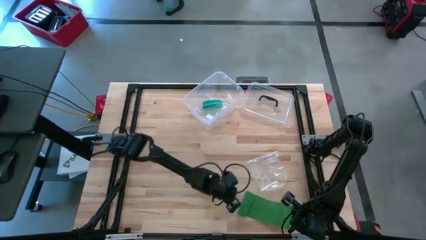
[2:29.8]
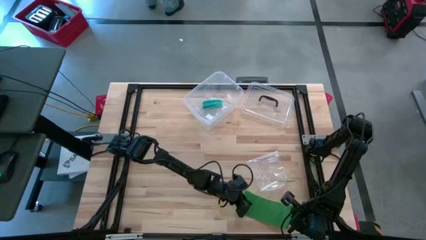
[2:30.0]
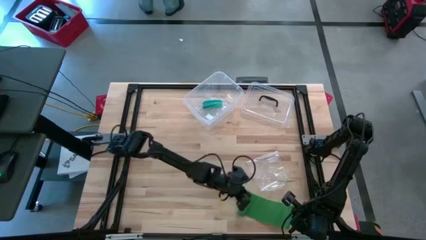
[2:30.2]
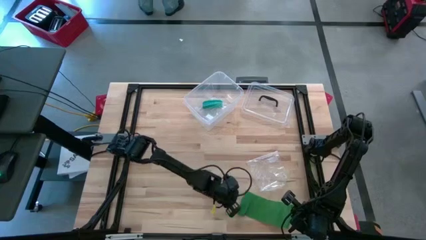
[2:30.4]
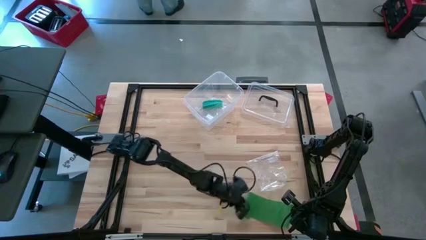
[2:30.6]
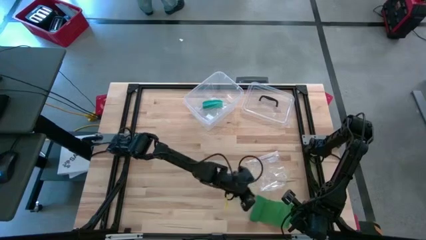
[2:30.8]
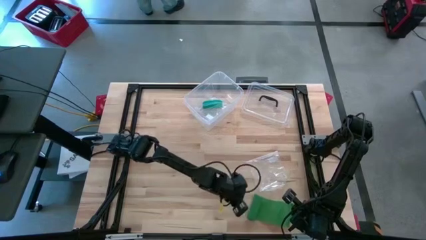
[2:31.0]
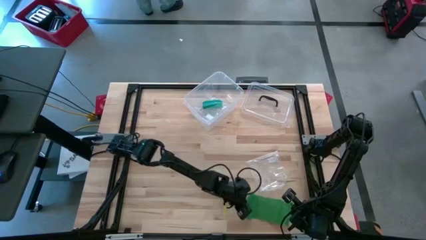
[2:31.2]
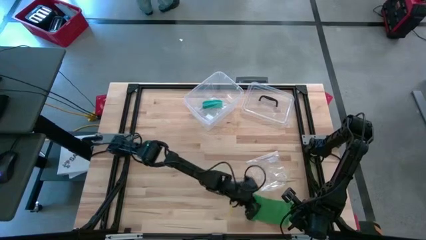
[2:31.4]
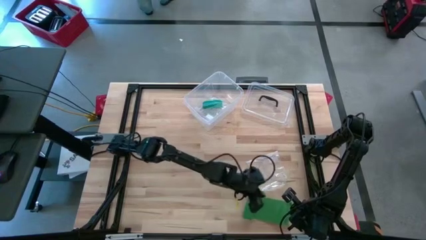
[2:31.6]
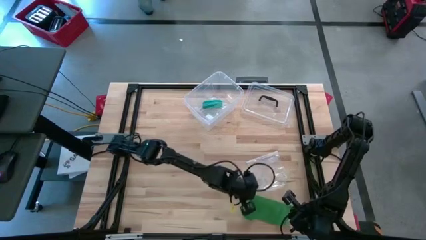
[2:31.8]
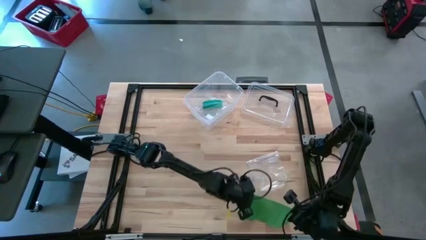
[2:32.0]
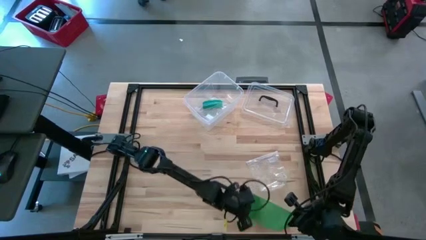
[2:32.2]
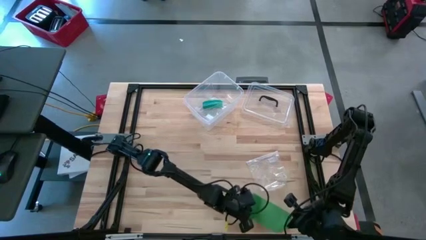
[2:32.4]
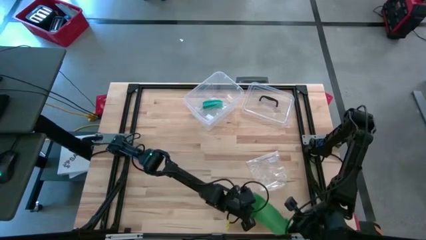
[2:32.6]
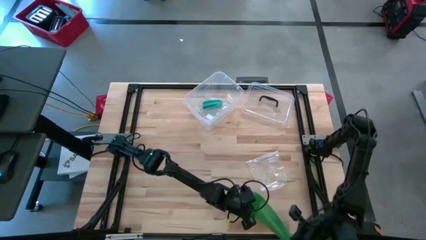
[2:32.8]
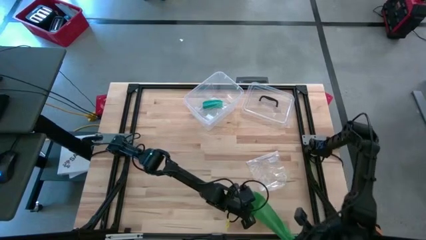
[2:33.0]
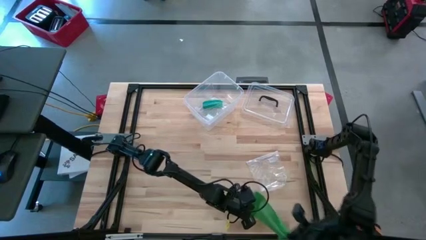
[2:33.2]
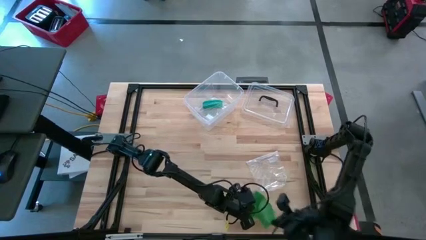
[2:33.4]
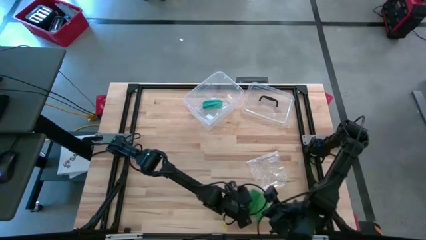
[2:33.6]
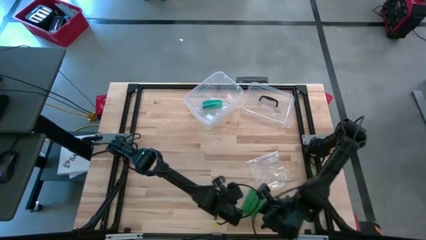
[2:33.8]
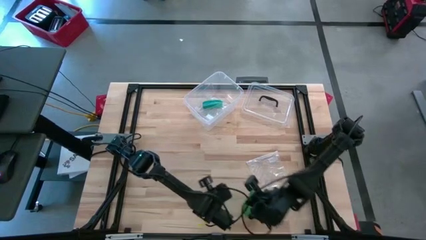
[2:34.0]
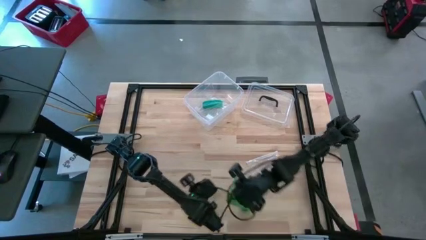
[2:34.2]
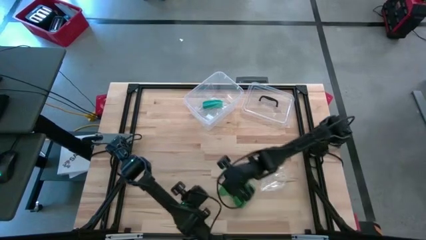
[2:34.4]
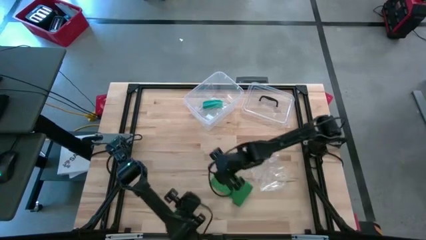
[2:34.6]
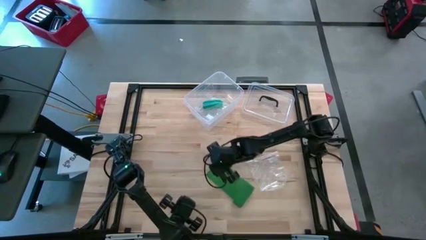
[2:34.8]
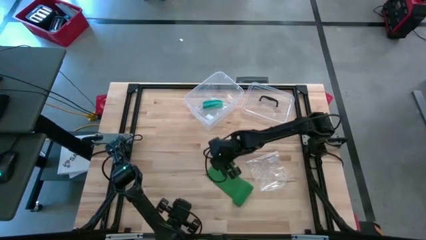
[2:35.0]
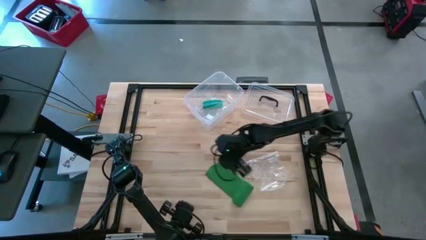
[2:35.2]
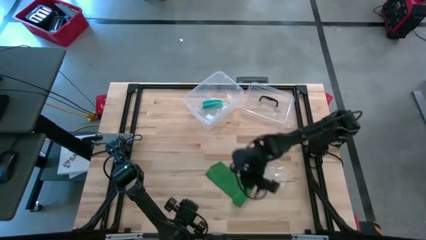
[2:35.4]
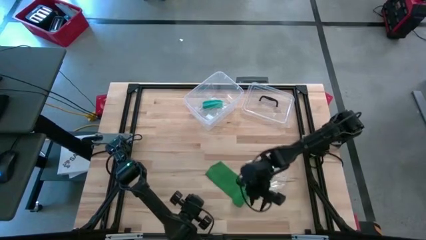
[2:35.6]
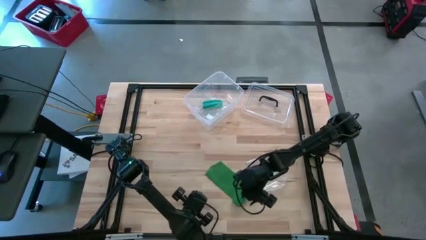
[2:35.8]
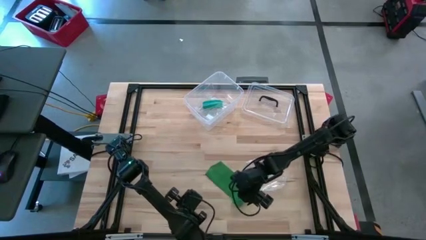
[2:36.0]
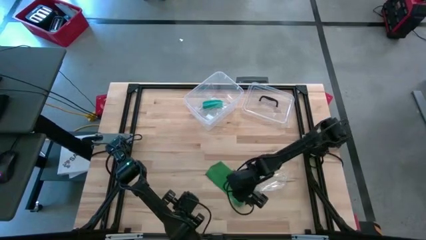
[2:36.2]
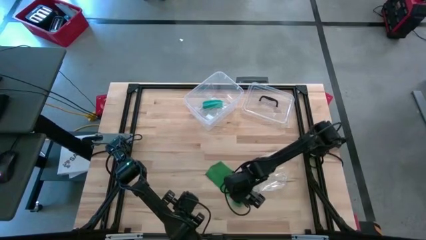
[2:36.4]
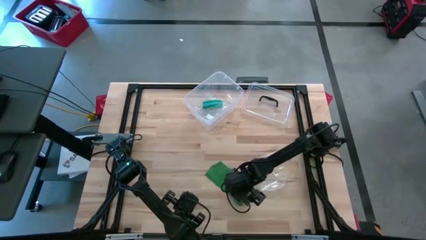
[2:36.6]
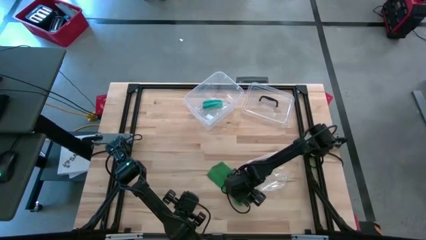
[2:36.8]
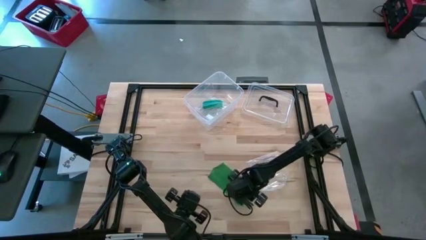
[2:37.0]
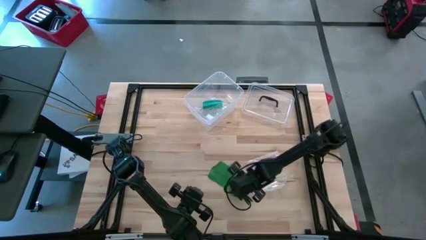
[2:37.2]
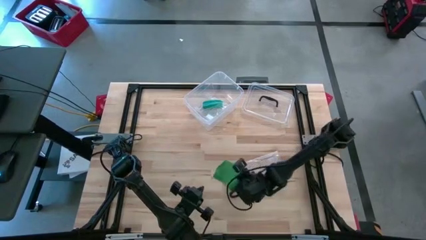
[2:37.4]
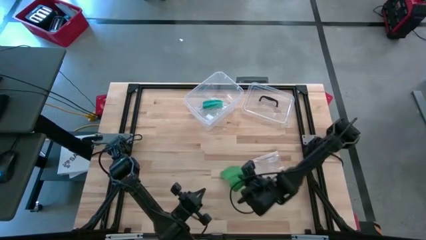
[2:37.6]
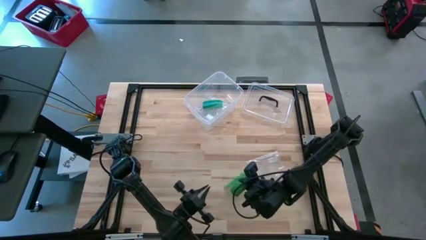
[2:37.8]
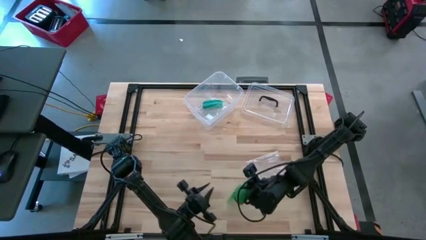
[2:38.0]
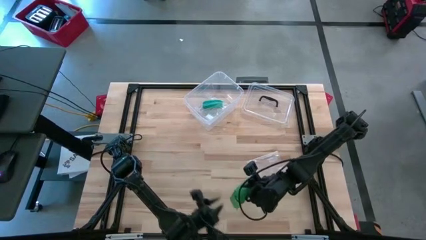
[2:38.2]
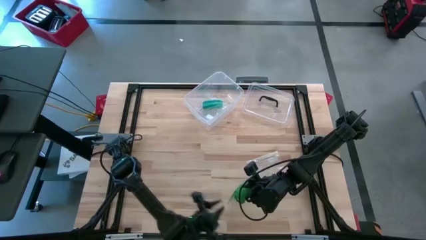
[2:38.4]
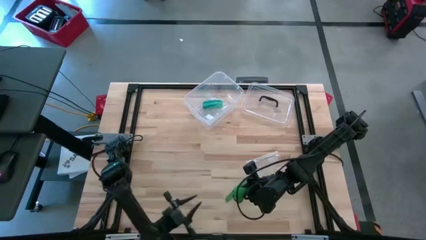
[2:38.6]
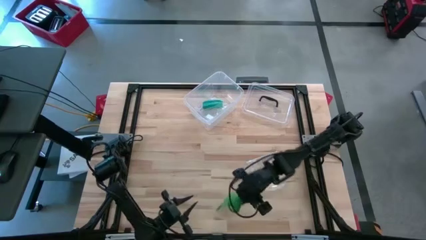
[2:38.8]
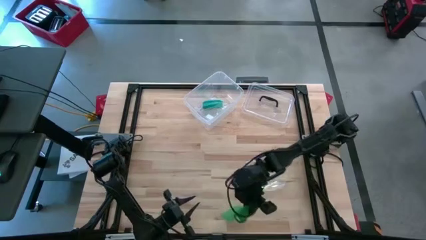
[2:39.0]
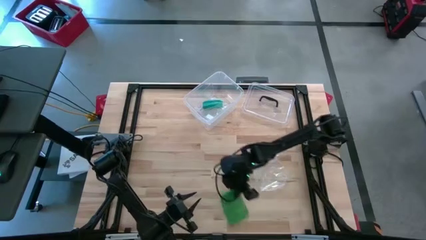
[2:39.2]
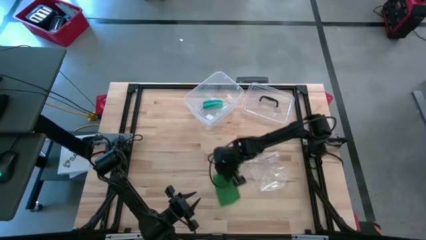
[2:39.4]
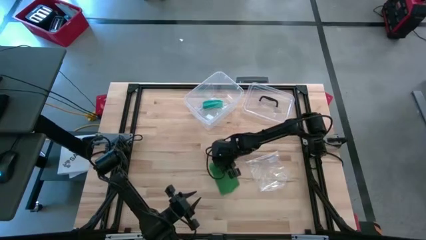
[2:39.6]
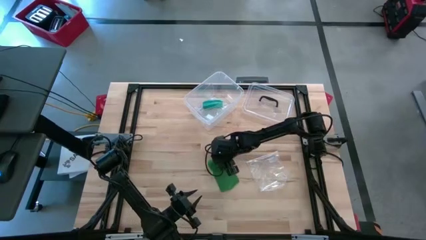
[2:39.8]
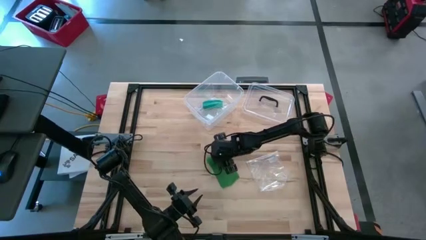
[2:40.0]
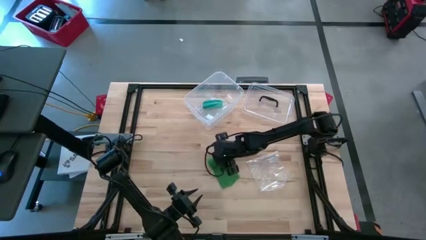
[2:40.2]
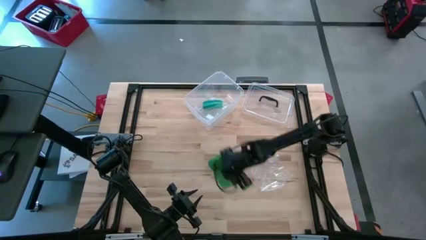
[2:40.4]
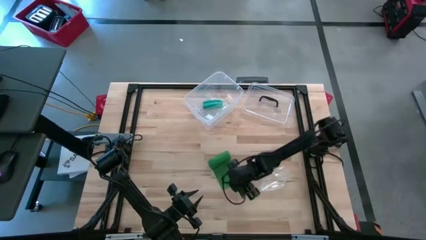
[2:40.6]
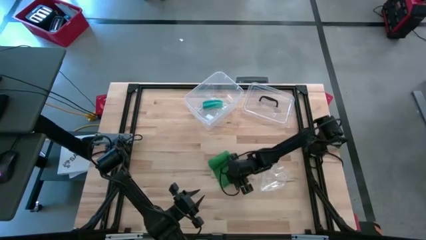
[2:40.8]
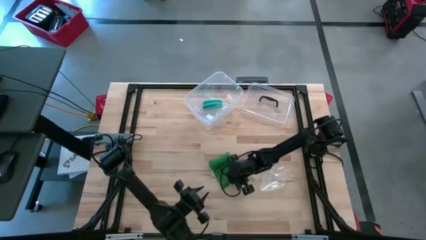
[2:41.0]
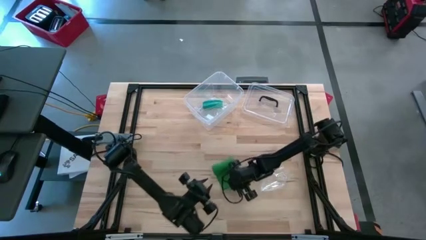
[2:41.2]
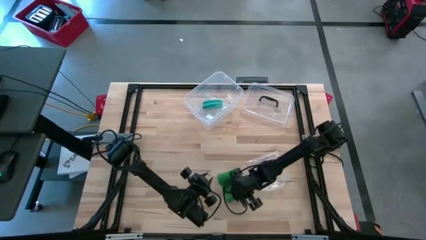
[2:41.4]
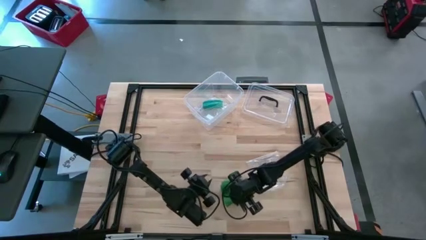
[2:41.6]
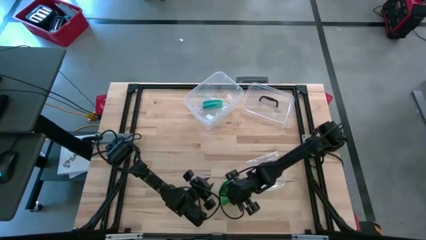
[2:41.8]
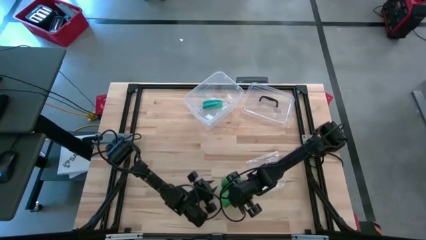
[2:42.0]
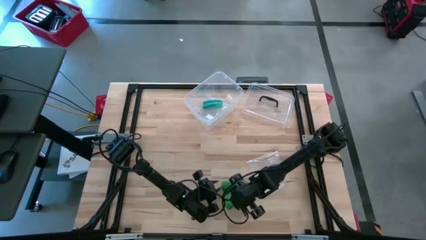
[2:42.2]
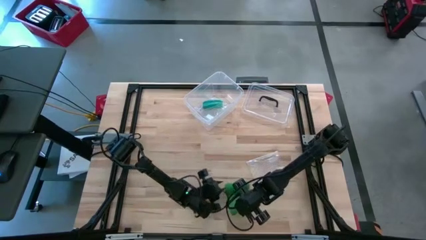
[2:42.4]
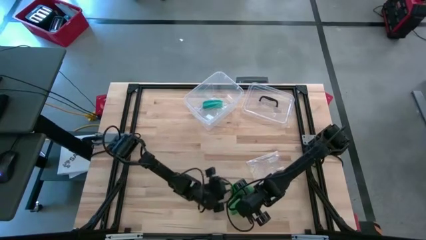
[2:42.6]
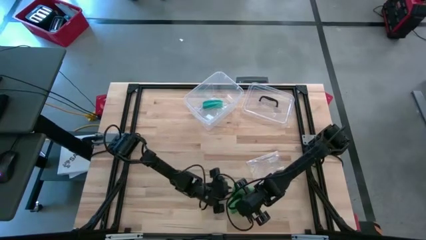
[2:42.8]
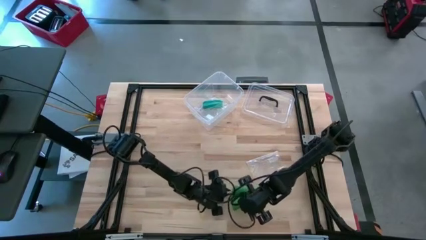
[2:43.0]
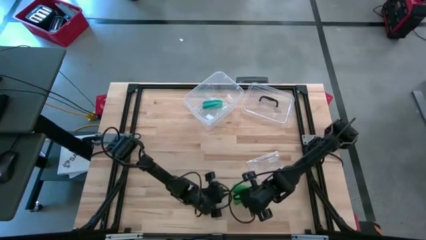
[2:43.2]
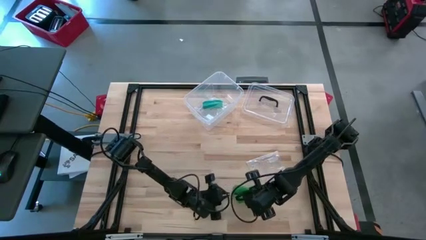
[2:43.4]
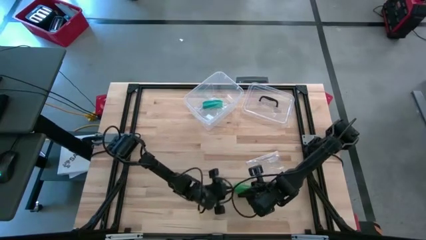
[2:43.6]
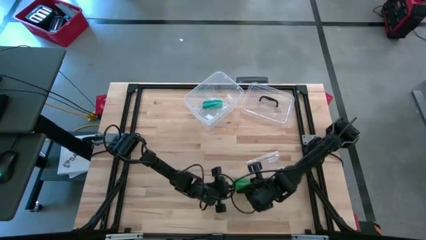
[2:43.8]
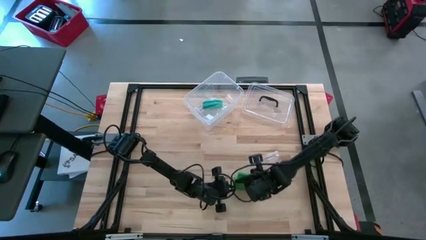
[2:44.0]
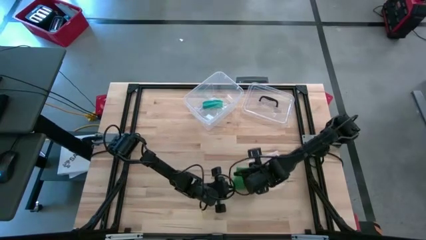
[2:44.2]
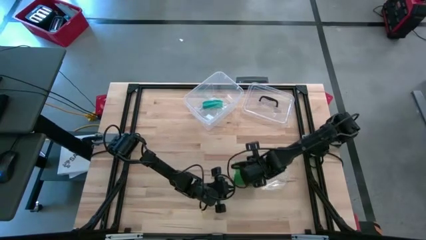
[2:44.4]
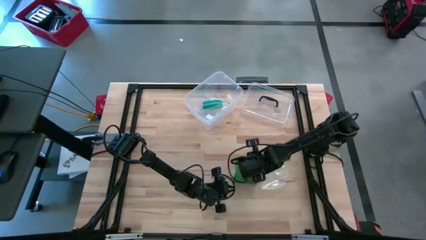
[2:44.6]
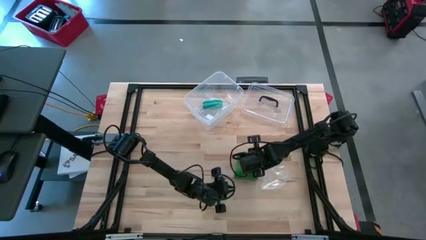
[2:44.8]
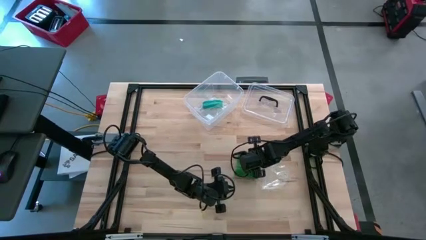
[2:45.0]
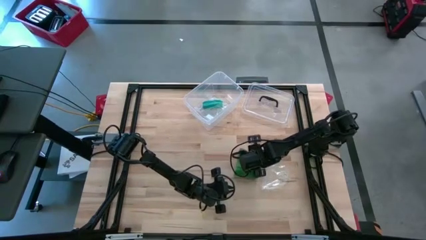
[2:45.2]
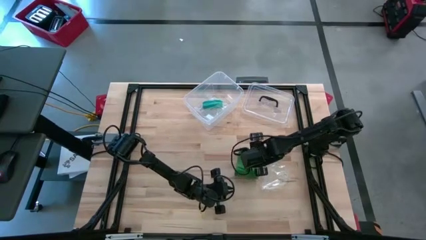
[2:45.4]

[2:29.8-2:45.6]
Task: Roll bandage
Roll the green bandage

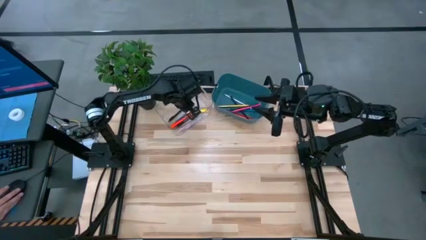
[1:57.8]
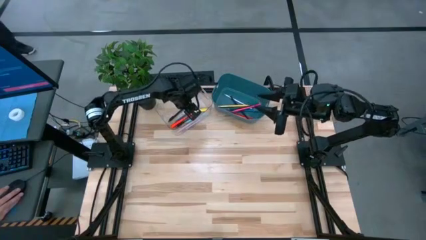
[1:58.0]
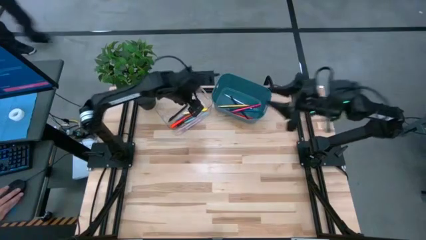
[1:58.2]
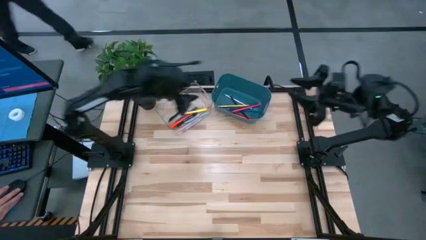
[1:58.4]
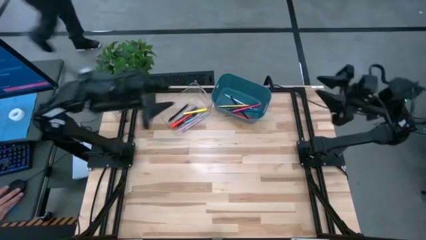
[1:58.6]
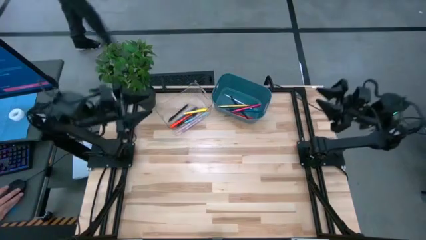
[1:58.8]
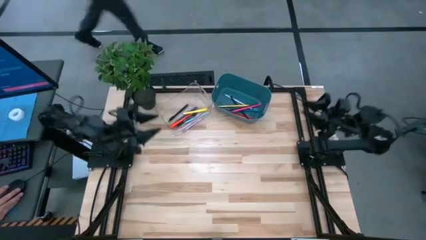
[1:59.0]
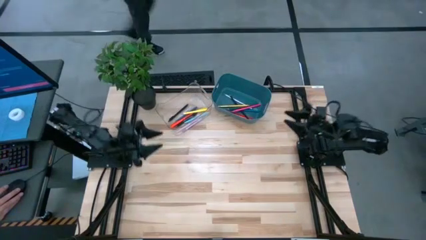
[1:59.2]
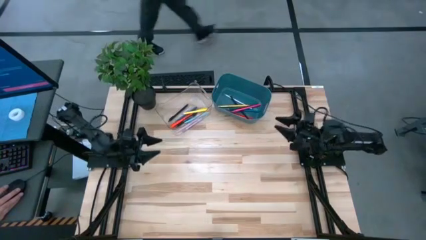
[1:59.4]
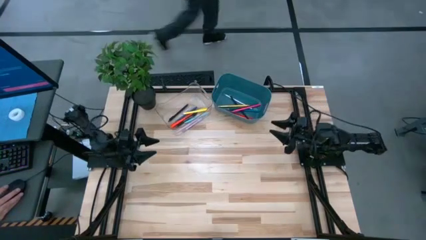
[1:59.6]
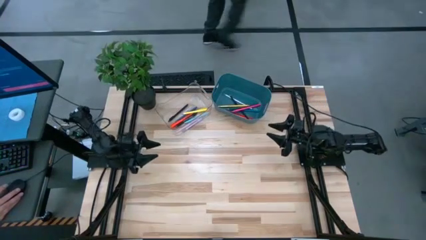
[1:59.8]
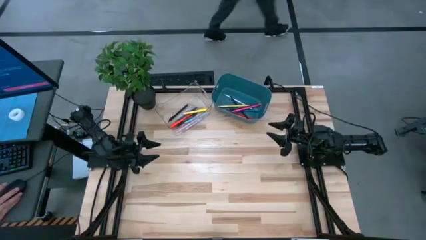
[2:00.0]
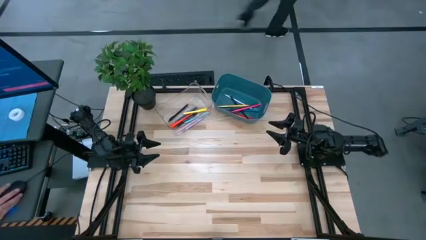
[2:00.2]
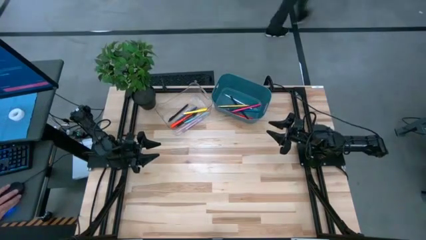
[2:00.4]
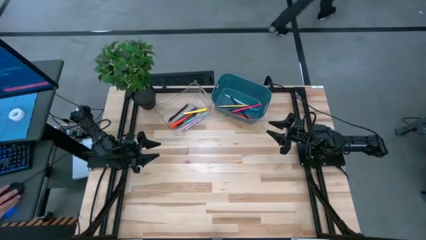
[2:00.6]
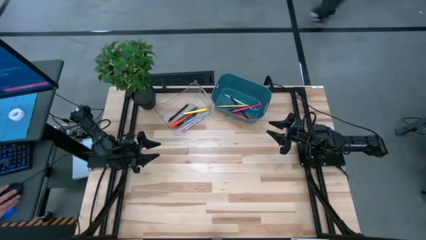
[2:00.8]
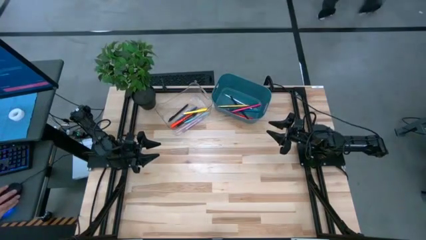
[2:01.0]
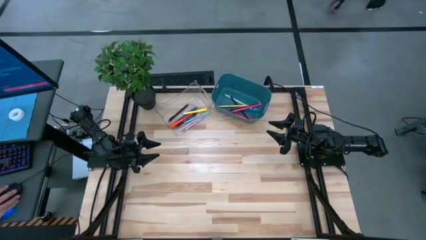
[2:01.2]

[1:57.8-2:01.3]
Task: Sort pens & pencils
Return to Home Position
